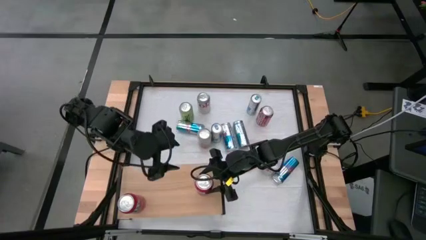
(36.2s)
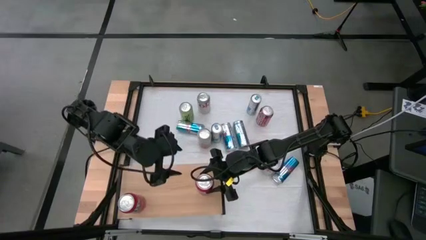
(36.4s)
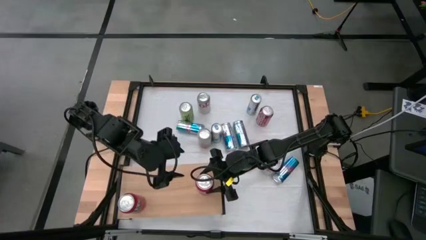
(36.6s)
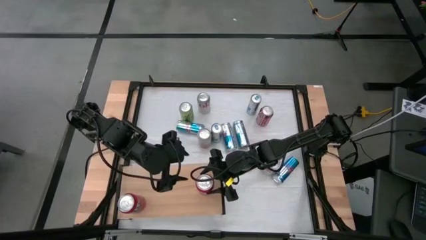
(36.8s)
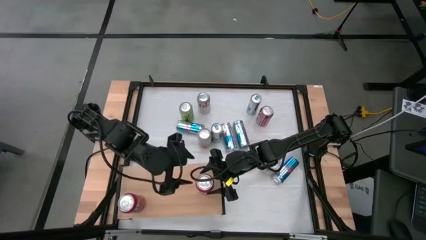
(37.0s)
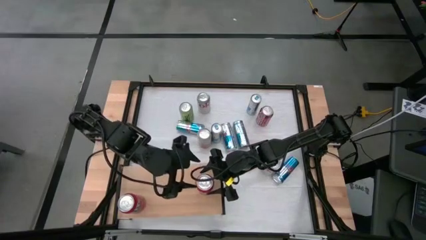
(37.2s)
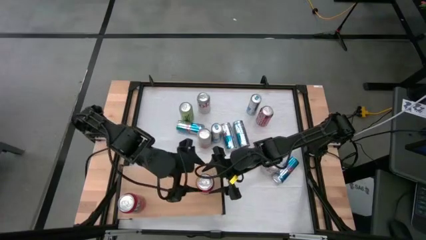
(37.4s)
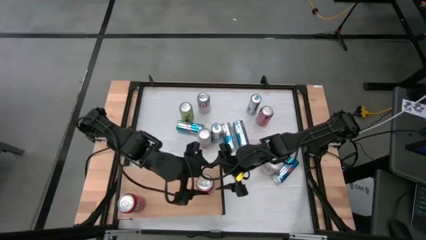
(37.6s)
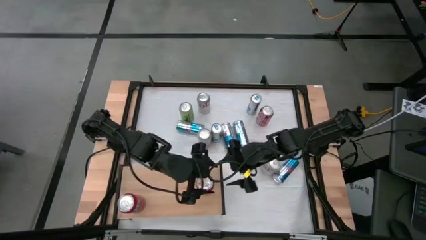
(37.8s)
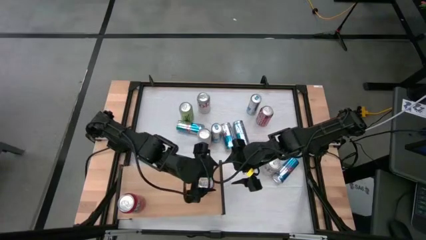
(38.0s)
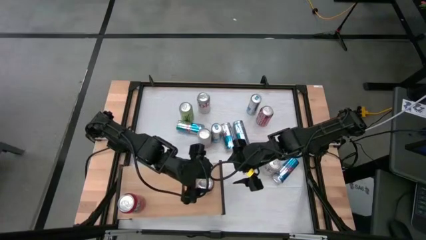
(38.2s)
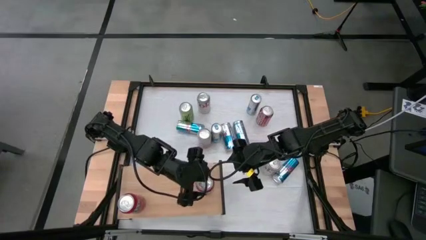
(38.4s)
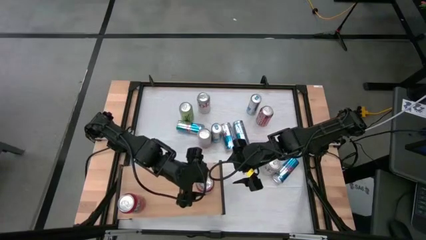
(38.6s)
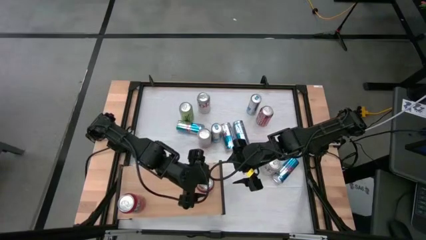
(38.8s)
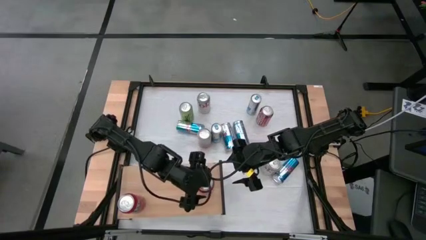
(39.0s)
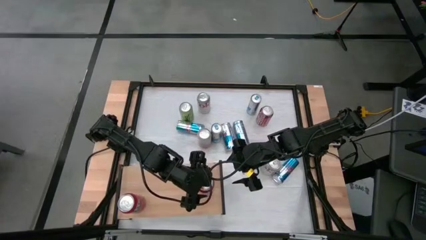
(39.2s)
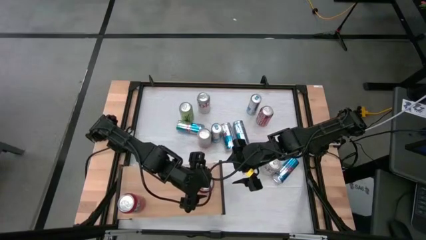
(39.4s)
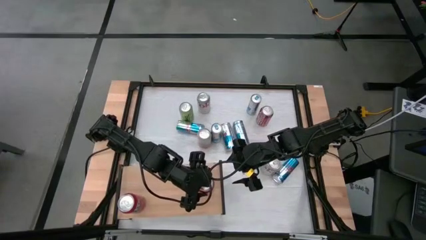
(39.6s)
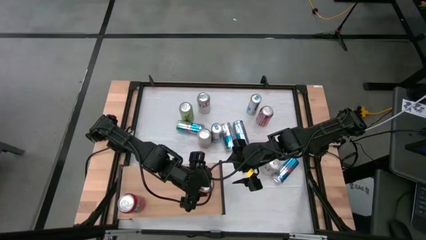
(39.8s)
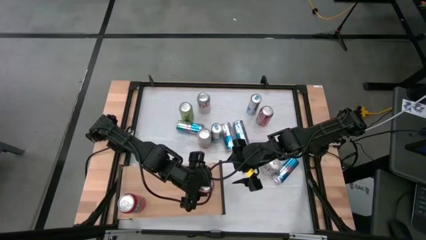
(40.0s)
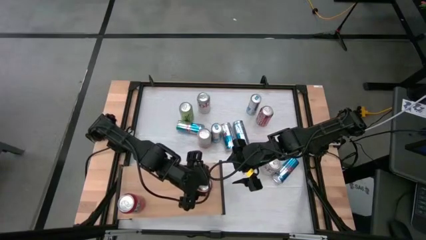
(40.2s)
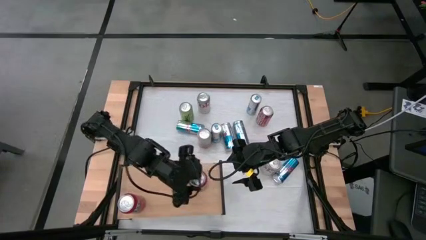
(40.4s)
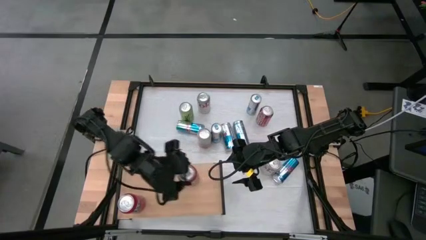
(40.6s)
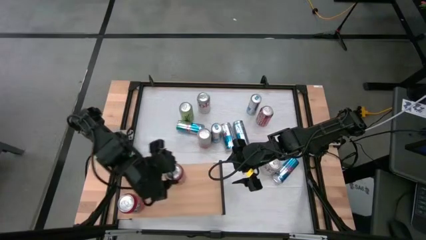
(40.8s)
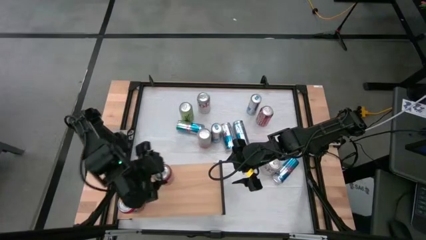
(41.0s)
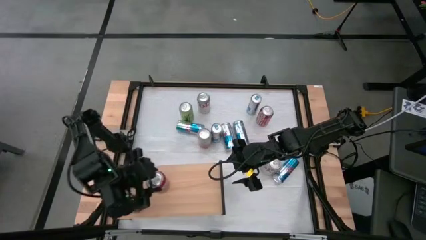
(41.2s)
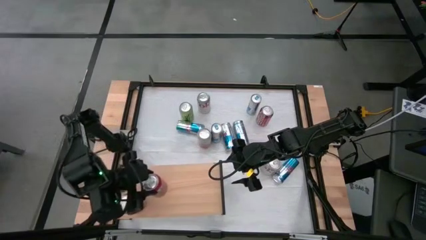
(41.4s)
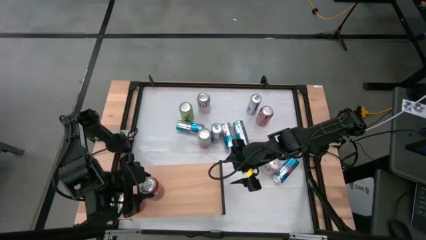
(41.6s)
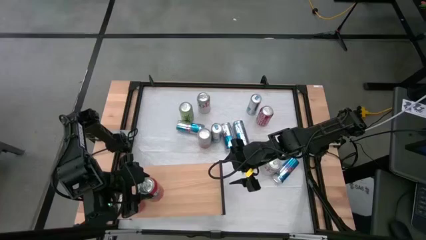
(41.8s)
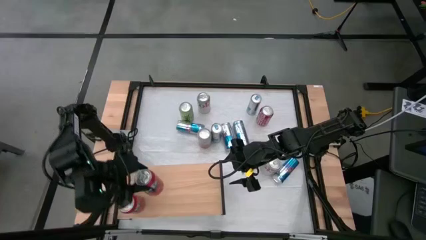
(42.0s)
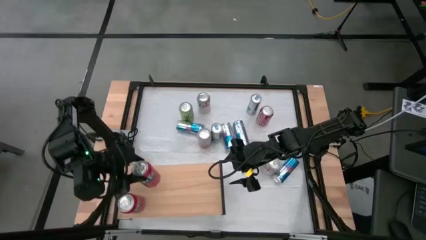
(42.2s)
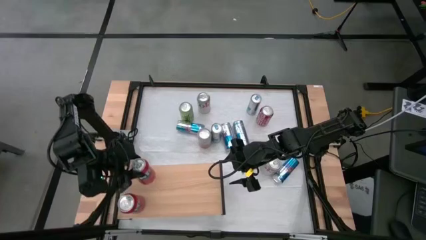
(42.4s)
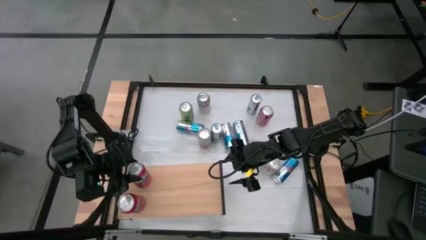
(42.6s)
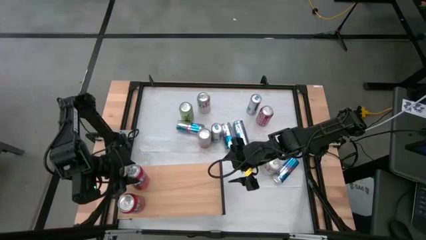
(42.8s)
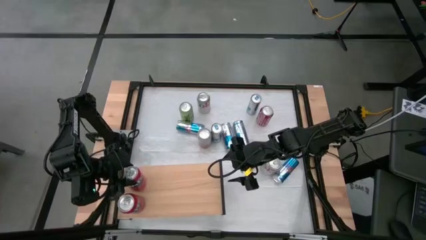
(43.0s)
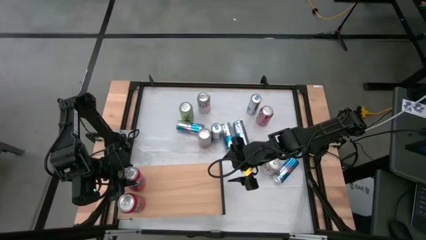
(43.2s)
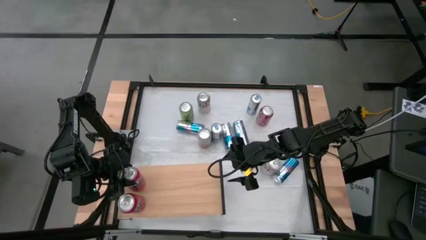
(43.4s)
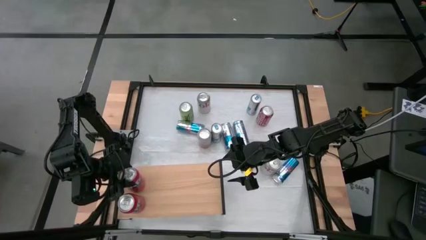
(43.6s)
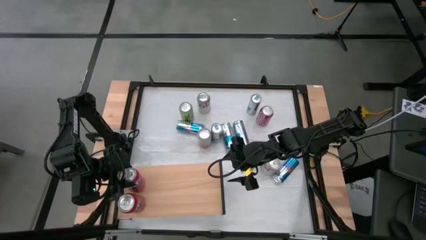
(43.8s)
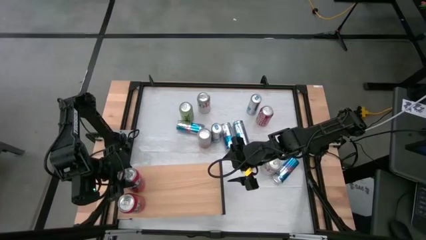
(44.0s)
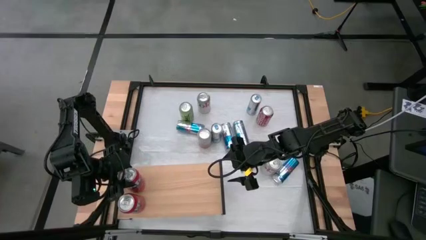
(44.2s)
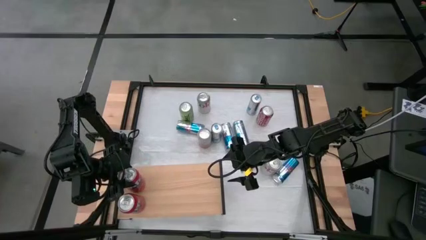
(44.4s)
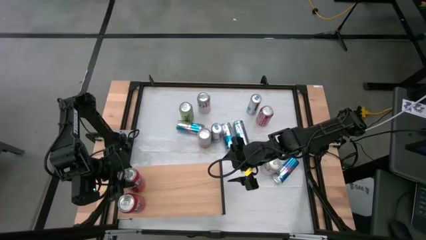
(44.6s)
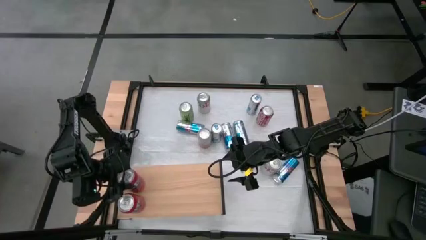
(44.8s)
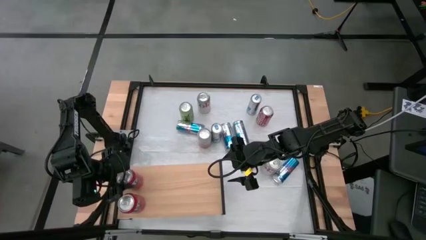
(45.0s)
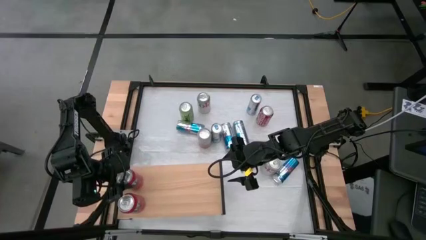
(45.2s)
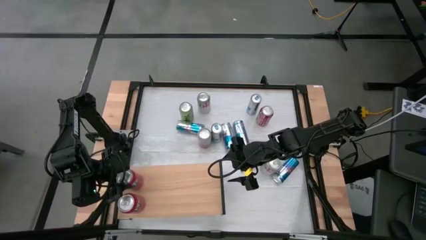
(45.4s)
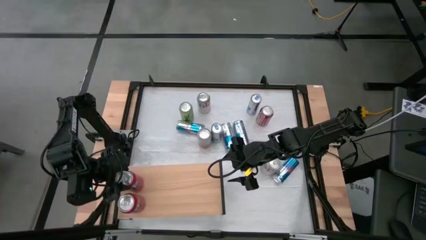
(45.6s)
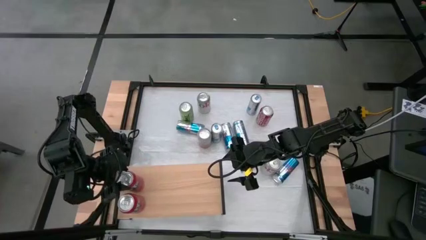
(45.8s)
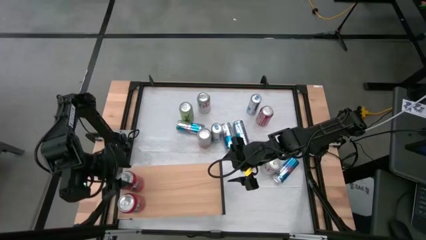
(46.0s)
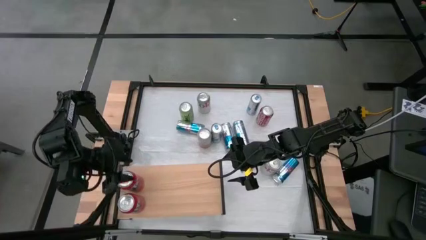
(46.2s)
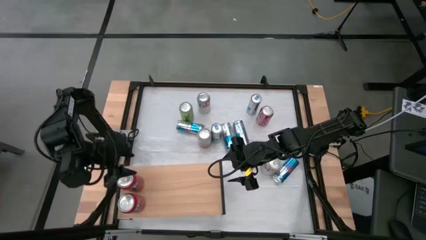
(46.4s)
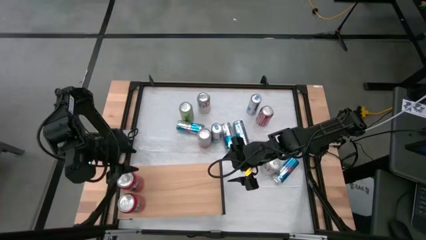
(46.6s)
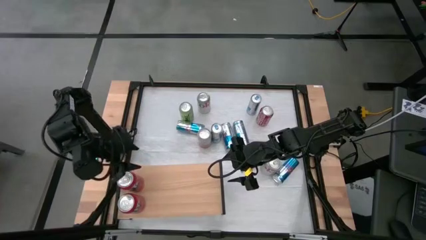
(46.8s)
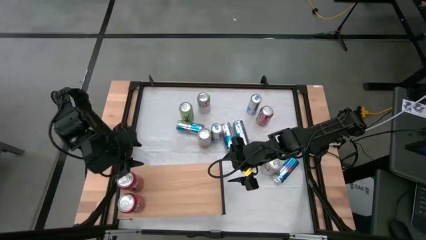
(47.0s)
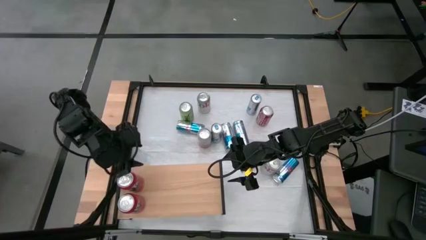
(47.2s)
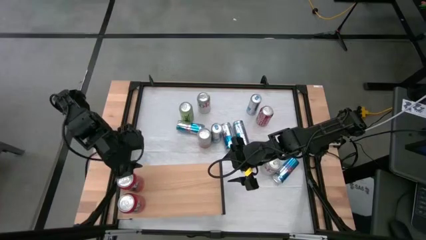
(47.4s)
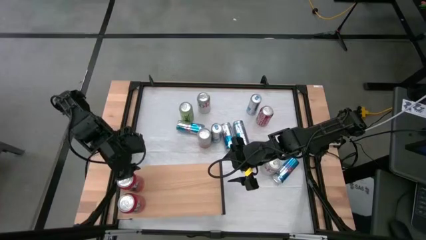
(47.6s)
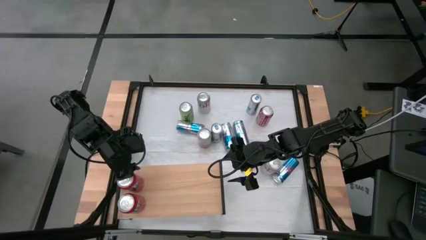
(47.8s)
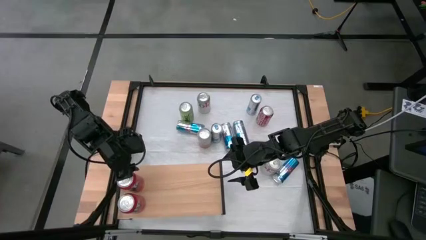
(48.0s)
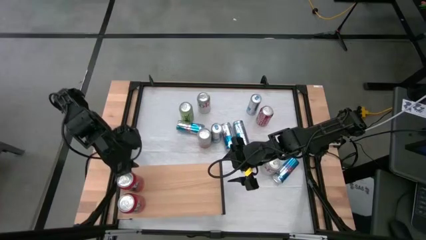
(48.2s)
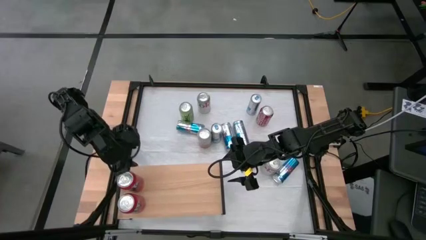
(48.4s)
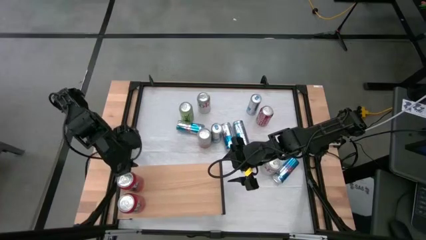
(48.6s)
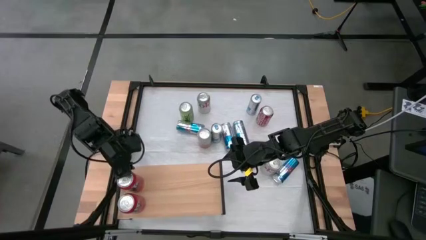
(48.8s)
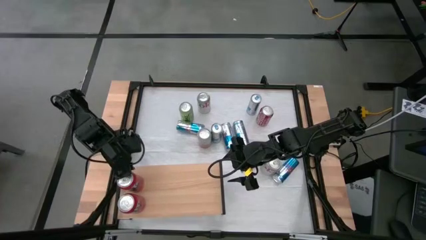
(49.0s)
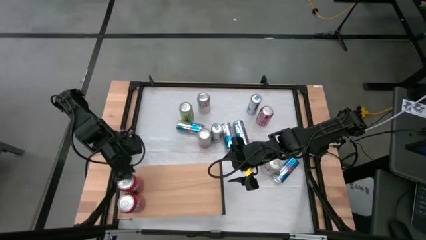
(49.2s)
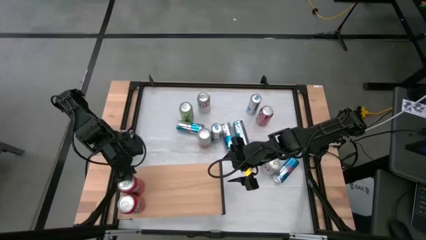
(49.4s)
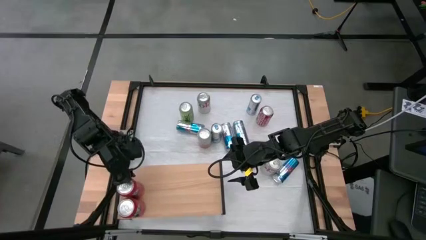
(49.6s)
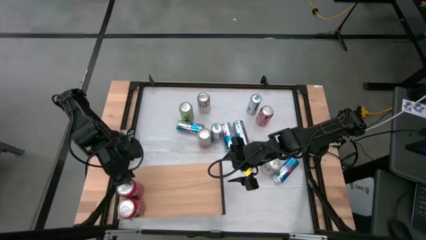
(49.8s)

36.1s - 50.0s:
Task: Place canned beverage on shelf
Put the orange soda can on the shelf aligned with the orange soda can

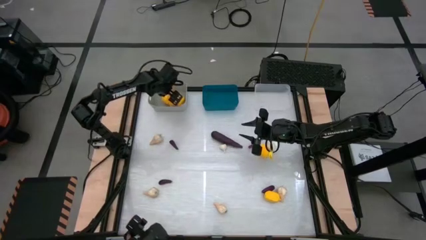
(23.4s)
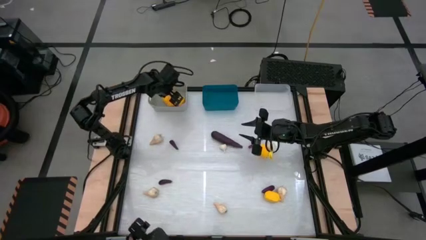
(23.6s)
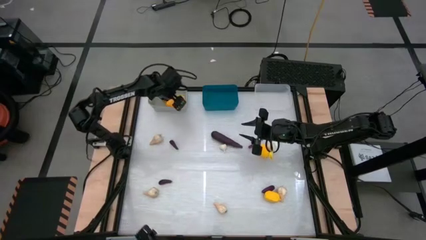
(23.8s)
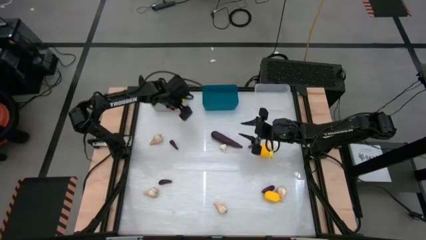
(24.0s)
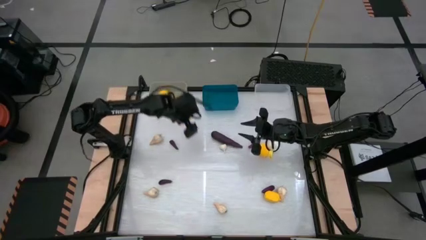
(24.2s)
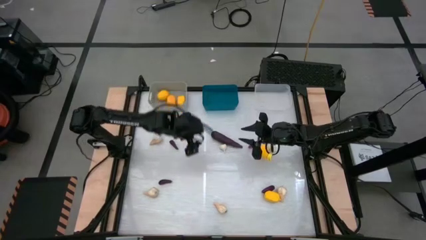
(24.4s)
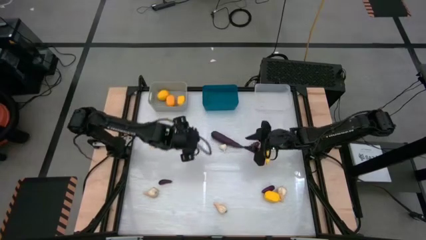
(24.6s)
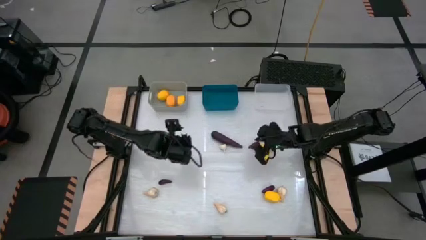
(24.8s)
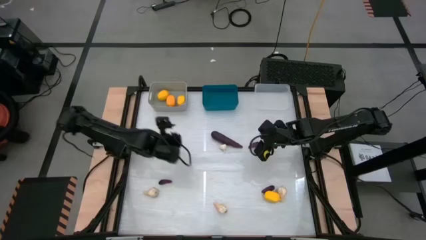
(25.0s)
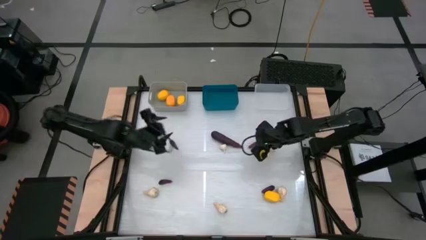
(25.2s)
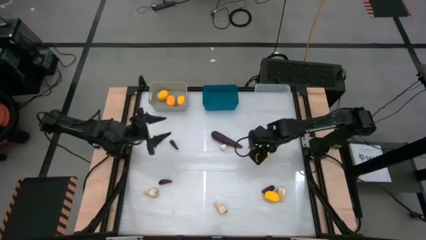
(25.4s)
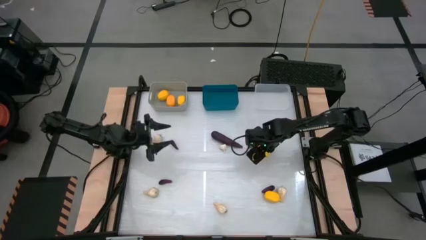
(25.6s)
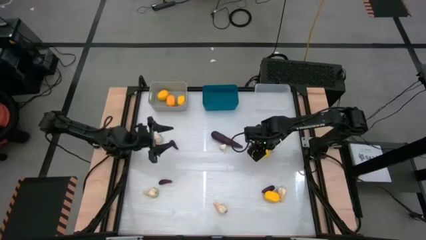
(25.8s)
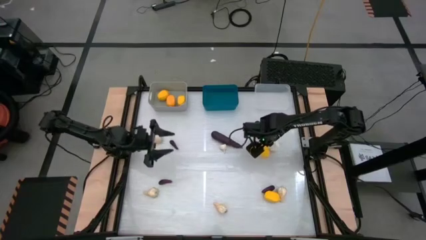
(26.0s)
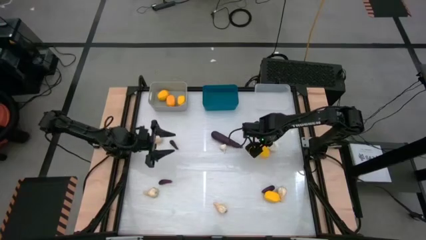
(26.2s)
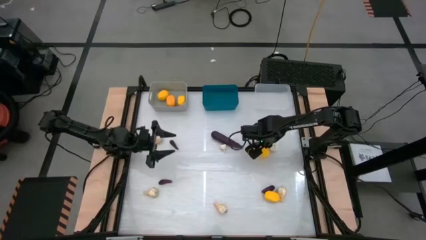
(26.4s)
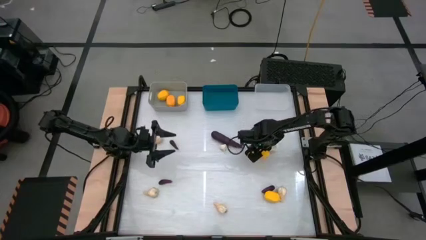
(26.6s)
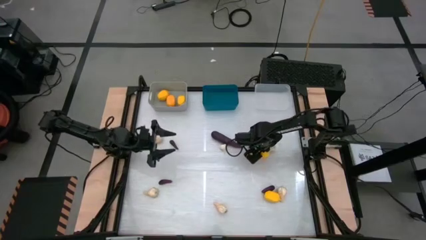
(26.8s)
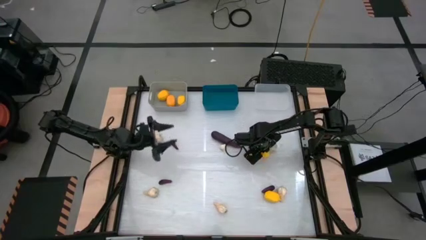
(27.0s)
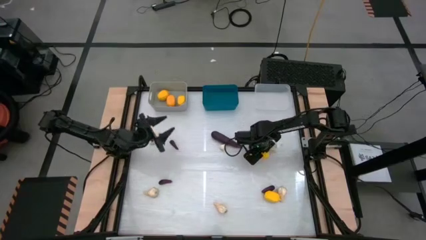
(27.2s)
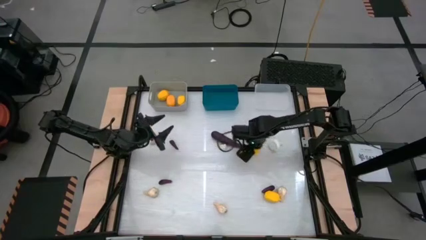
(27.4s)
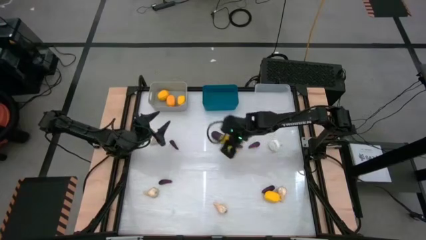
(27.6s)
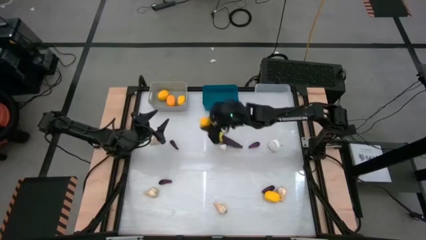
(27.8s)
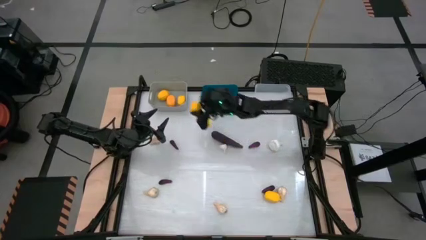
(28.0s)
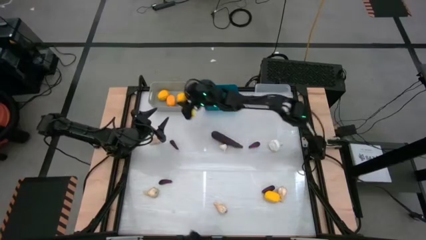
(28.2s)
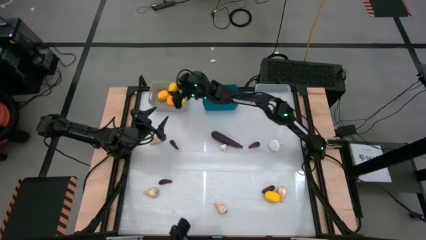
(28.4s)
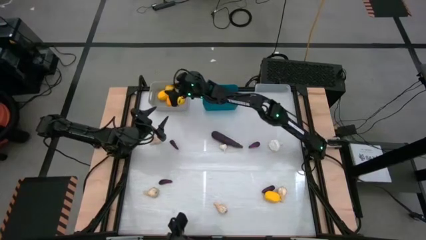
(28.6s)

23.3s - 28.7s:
Task: Sort produce into baskets
Put the top lemon into the gray bin
